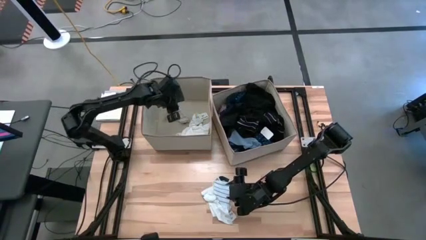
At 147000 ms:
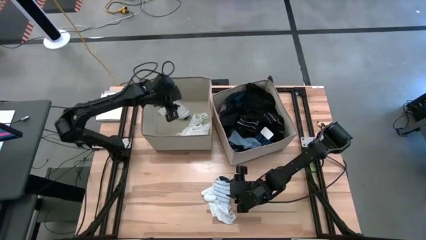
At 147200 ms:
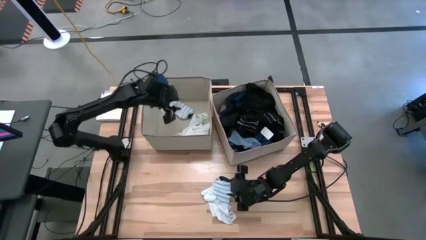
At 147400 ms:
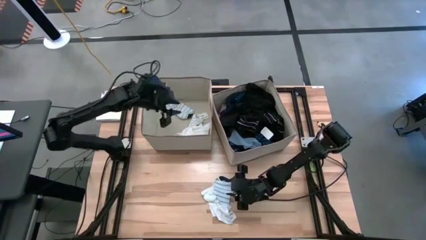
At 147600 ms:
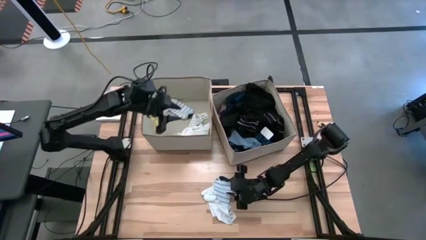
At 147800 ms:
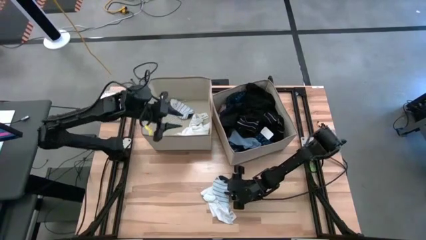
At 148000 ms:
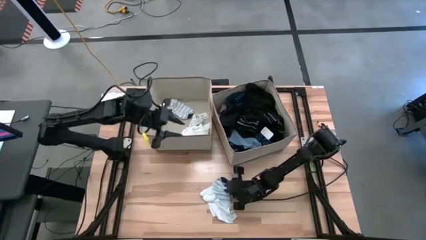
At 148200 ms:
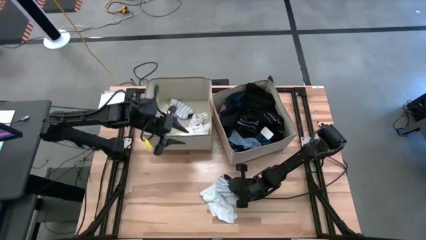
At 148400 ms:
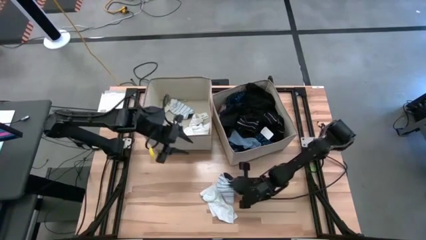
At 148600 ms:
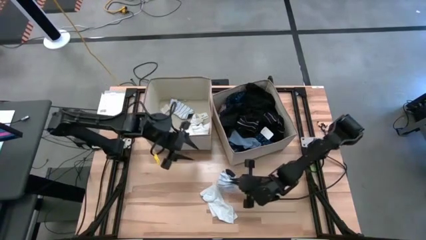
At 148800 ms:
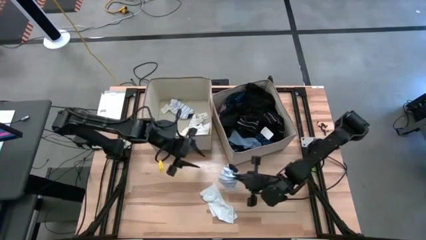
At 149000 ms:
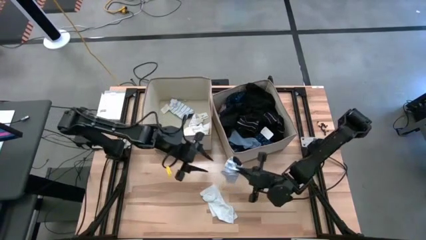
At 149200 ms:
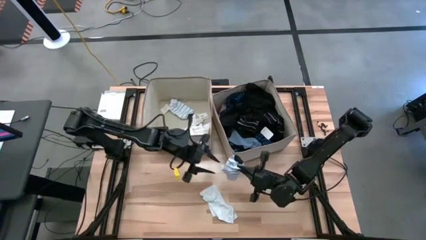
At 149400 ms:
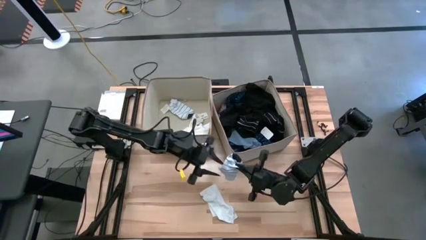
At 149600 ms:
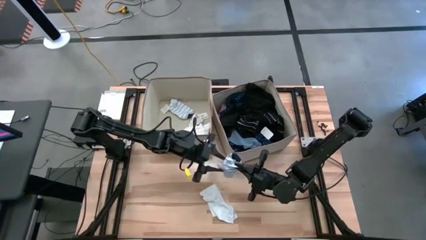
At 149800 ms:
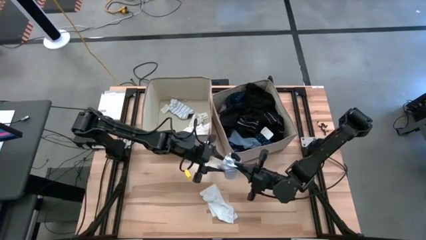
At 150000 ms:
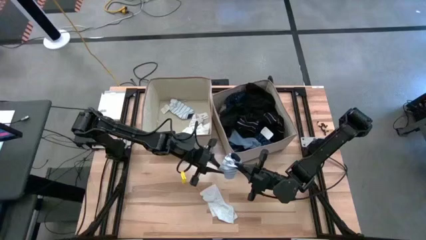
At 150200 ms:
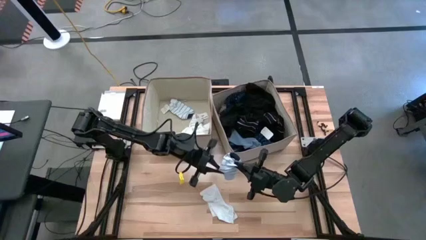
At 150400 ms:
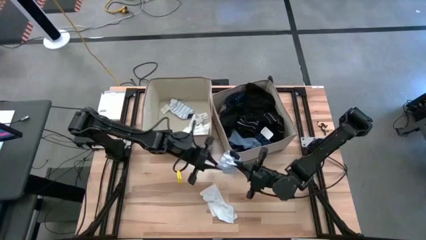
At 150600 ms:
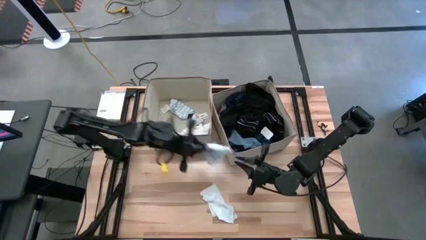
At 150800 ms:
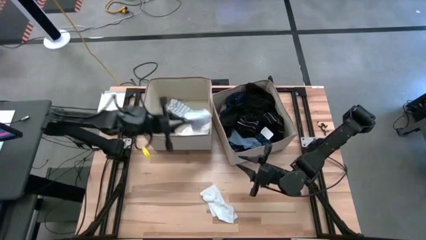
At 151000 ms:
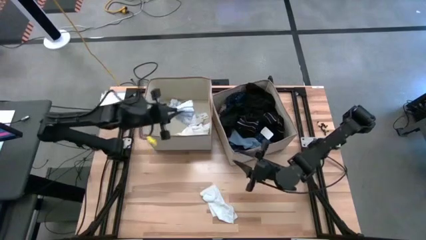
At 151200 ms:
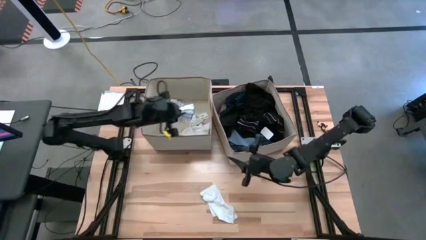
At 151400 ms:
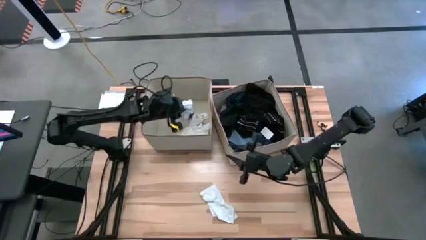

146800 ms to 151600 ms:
Task: Sort clothes
Put the white and blue sock into the left laundry organizer

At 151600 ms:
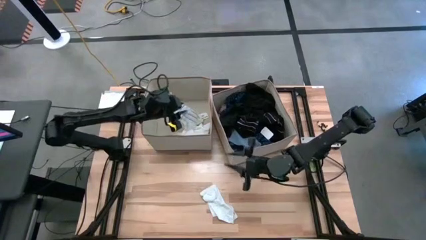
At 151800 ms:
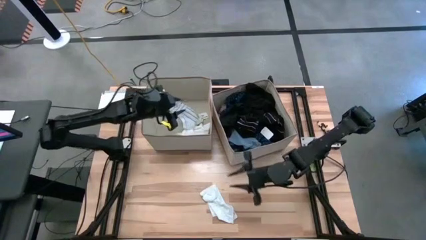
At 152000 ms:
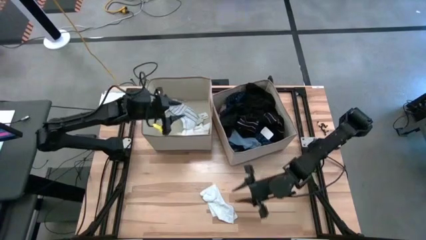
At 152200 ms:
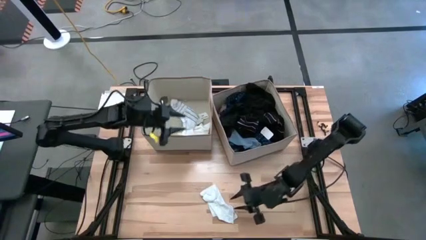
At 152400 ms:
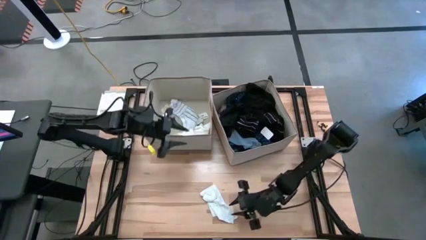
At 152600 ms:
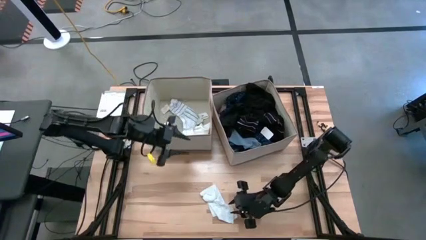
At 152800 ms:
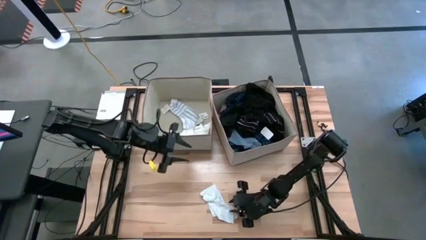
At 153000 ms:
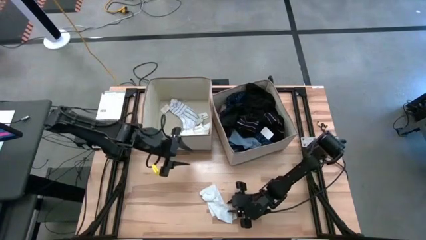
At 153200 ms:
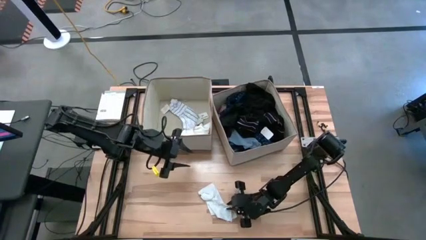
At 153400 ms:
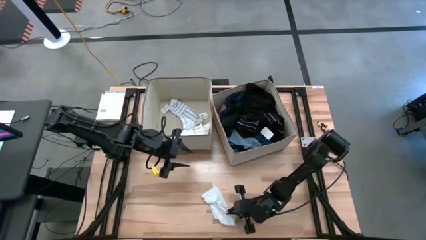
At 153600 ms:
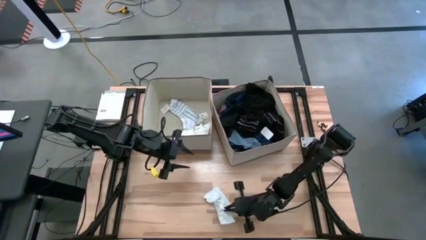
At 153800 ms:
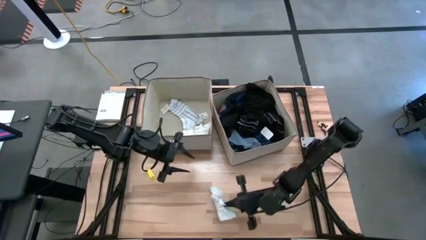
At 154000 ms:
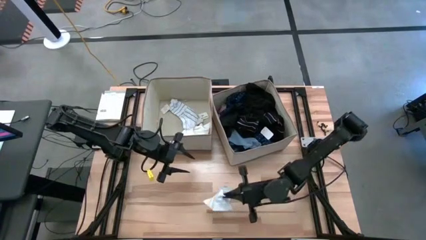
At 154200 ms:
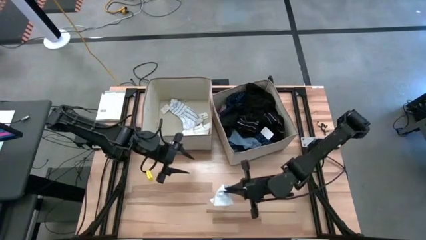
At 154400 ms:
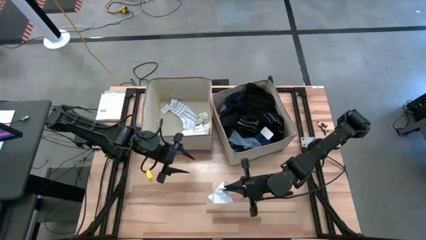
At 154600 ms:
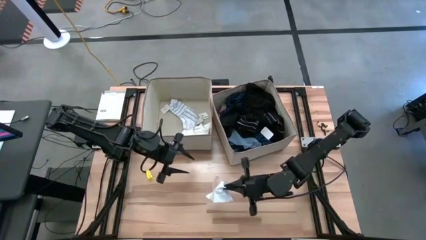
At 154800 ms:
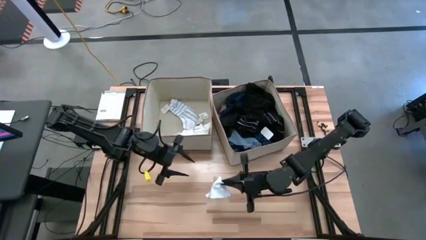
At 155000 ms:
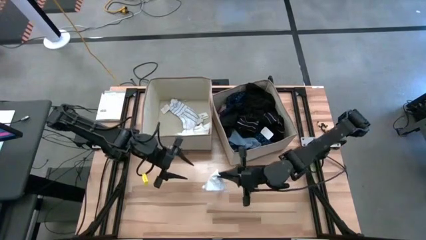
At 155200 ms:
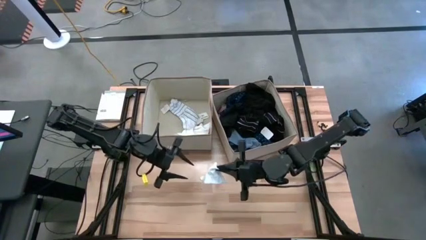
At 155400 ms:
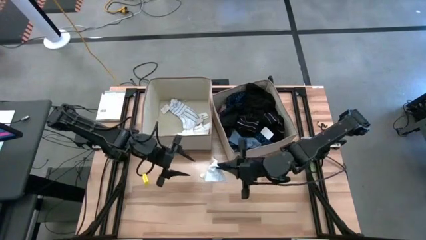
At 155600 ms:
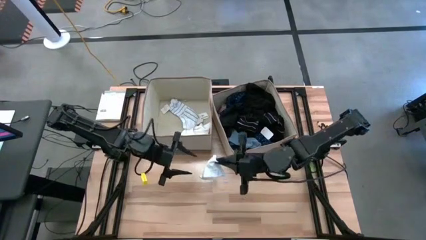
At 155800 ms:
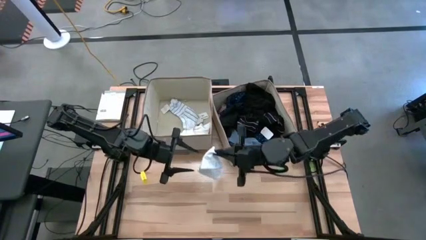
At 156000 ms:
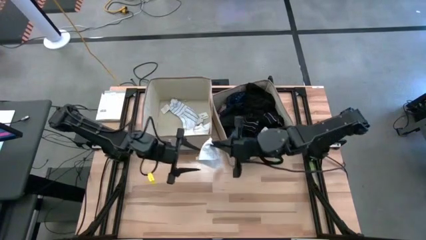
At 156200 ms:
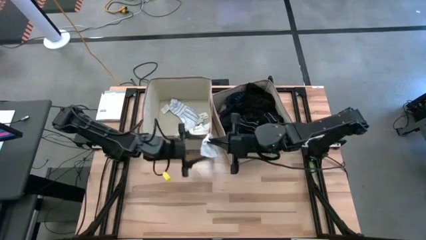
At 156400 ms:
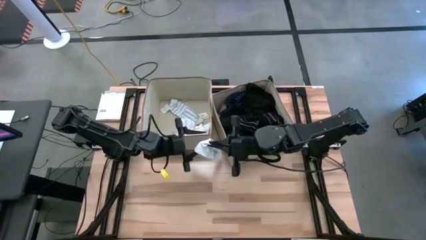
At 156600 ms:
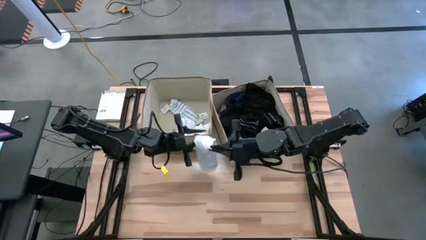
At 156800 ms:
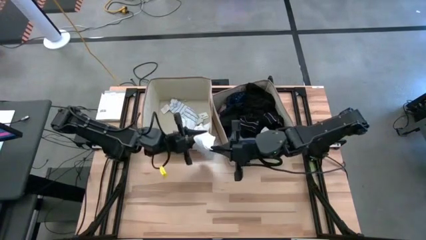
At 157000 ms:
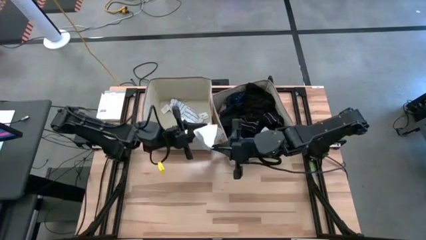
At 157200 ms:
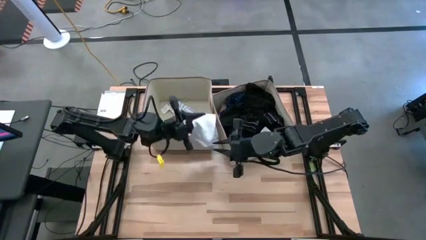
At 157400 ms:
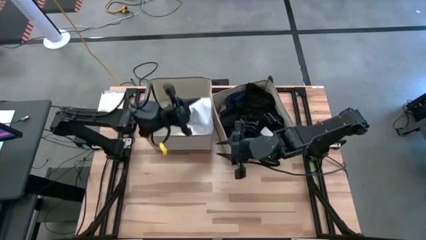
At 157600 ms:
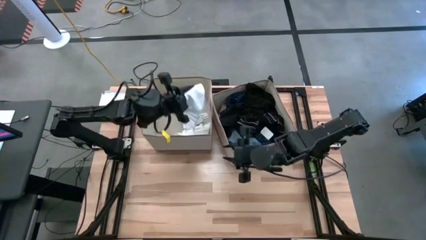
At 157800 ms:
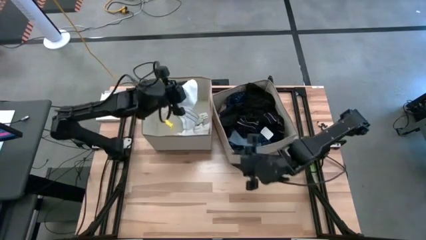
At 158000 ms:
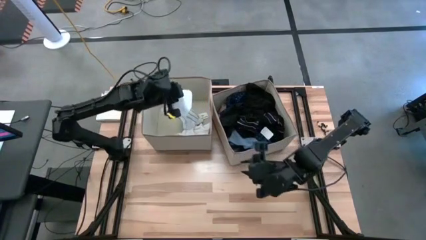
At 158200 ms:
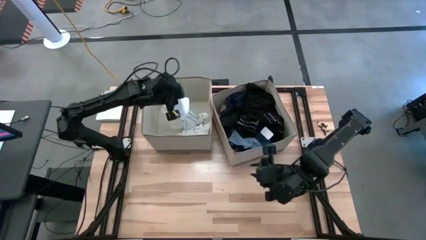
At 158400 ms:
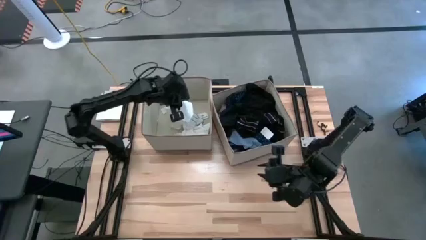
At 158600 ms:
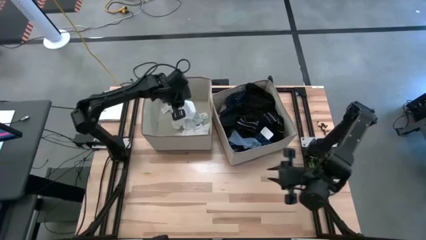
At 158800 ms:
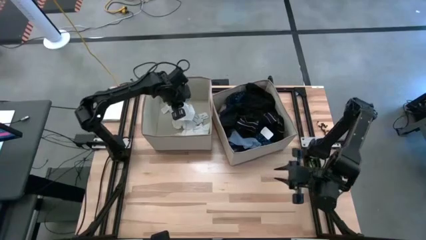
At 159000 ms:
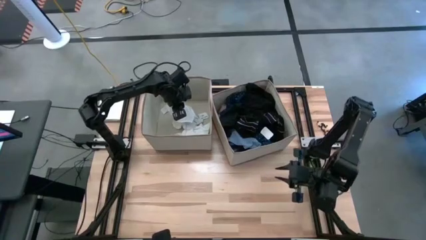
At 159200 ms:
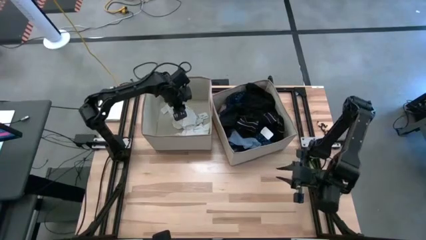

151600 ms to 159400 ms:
Put the white sock into the left laundry organizer

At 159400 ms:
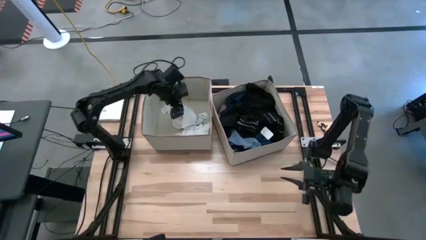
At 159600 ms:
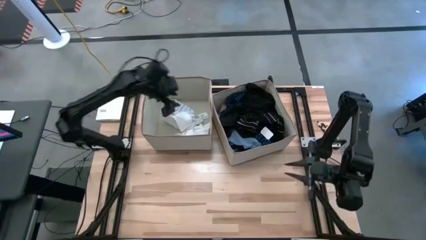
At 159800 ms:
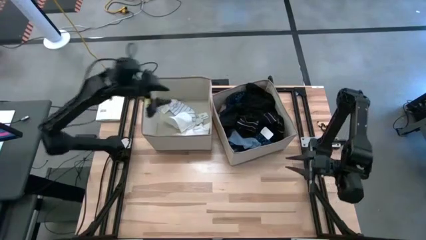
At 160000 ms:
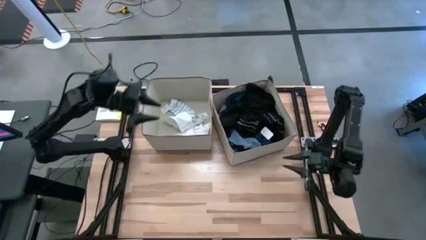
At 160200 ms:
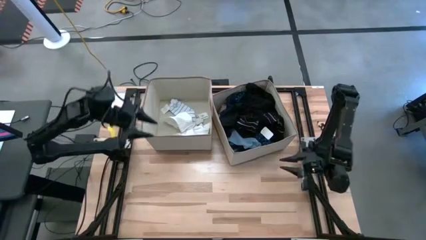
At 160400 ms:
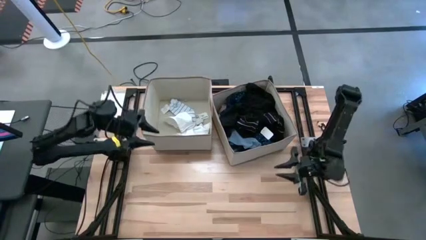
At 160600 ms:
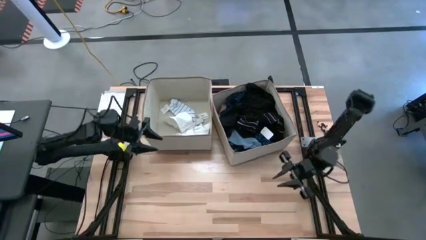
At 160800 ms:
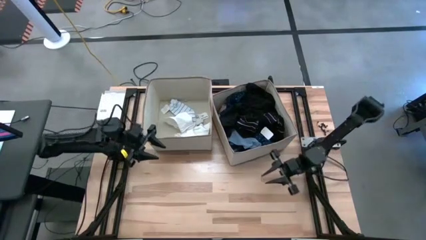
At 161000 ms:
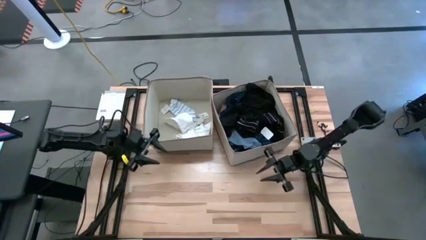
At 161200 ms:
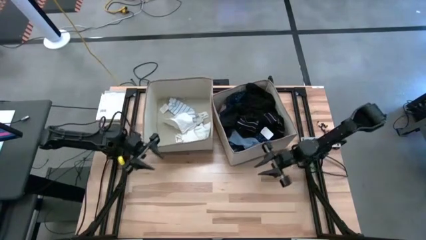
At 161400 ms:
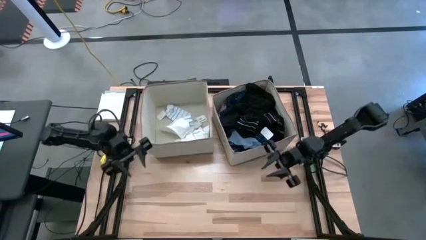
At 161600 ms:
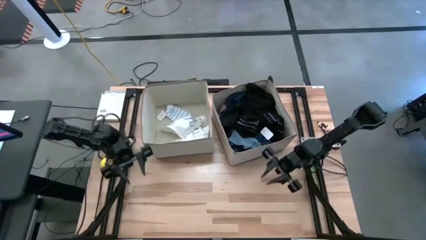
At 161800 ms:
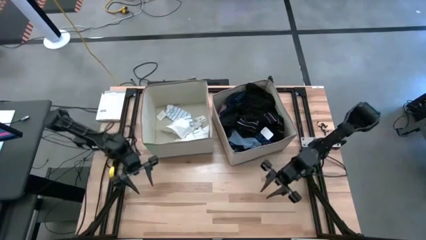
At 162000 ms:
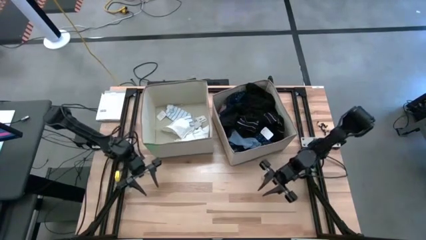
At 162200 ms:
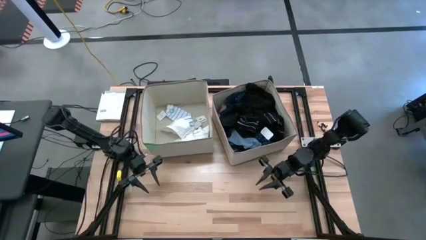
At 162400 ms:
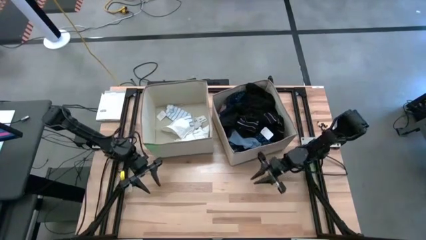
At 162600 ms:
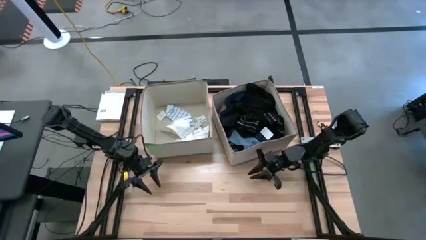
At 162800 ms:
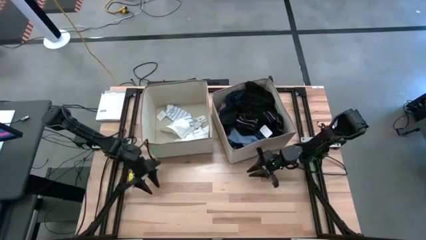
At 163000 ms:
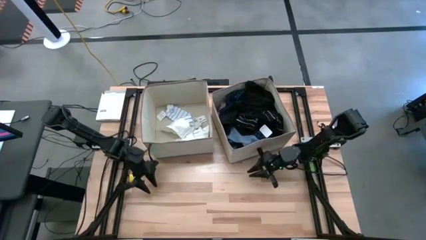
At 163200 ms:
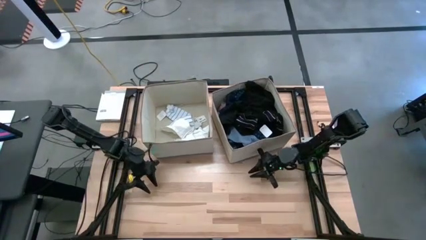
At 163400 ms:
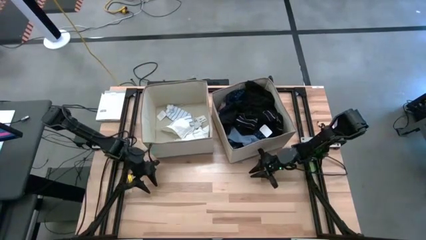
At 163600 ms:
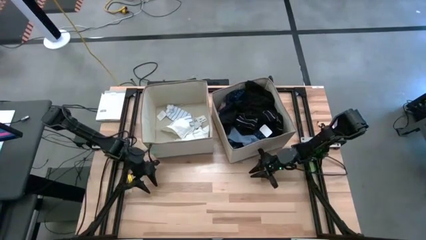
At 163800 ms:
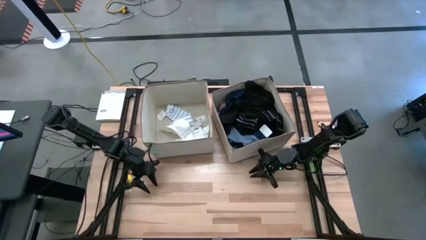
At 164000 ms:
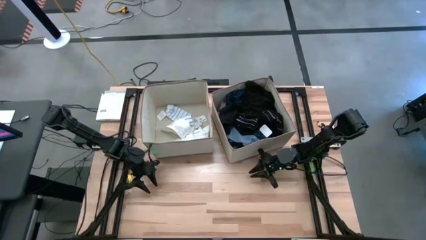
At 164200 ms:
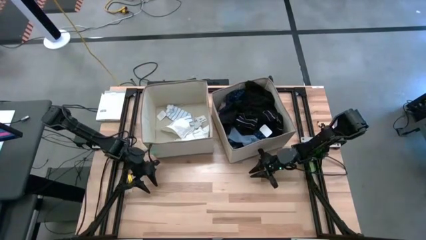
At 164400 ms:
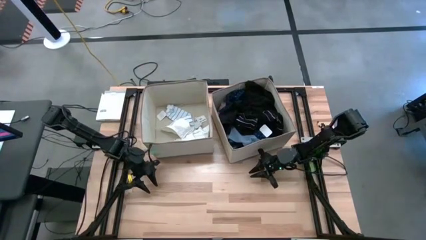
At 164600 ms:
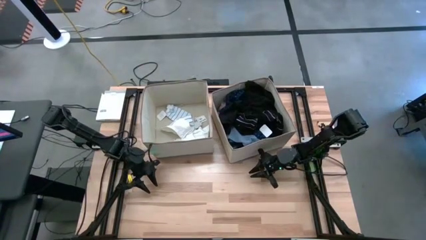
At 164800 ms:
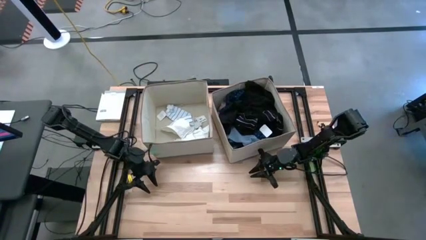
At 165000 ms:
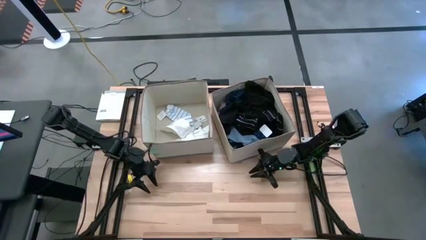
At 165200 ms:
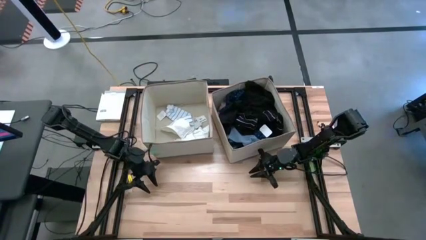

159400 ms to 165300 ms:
Return to Home Position
